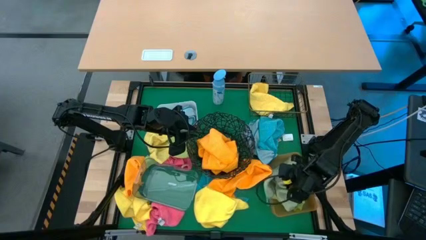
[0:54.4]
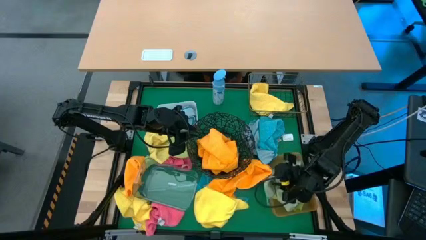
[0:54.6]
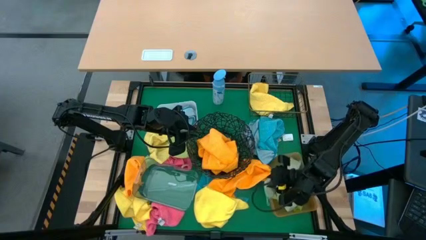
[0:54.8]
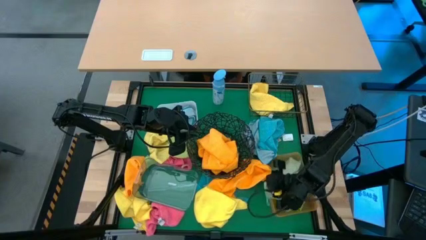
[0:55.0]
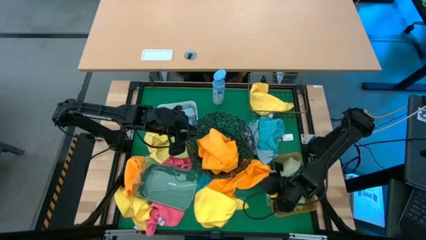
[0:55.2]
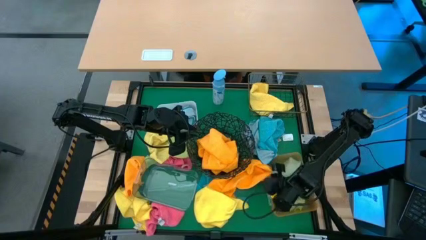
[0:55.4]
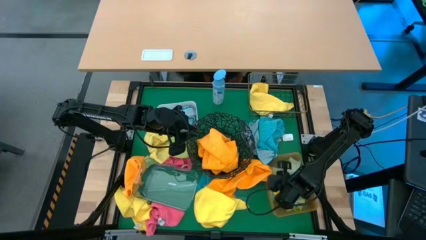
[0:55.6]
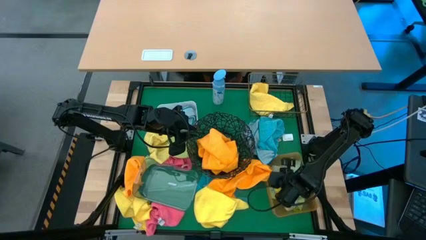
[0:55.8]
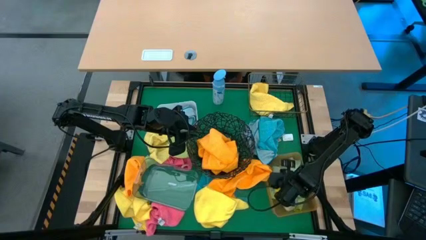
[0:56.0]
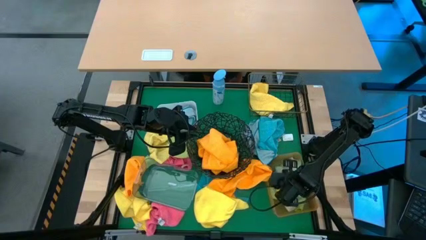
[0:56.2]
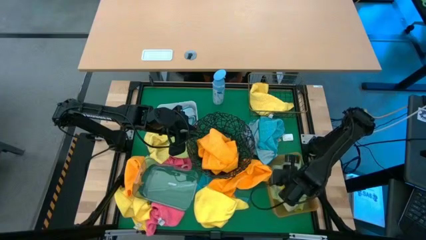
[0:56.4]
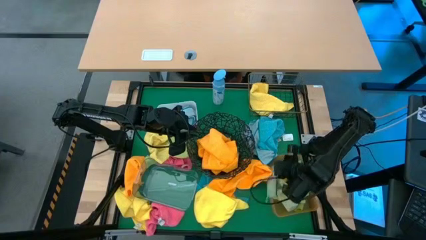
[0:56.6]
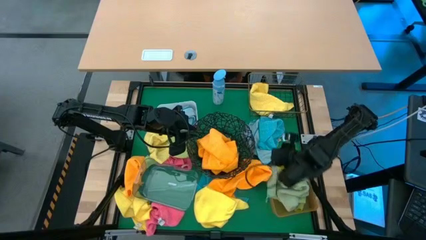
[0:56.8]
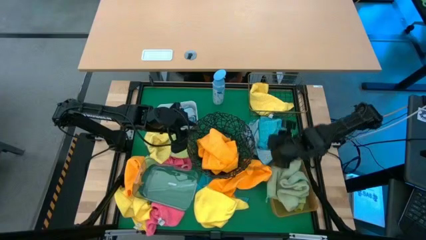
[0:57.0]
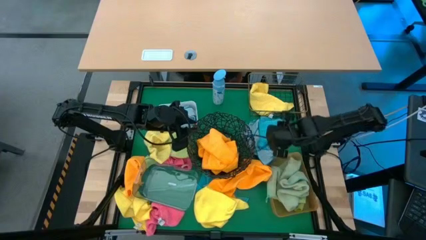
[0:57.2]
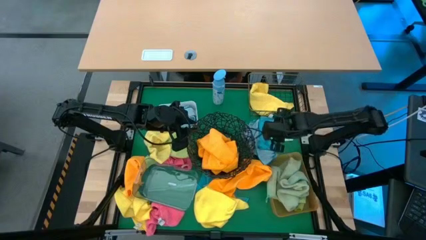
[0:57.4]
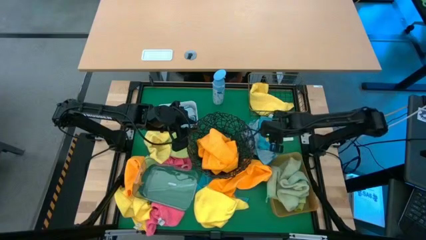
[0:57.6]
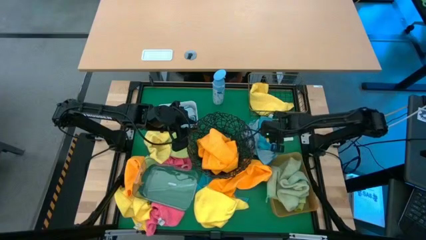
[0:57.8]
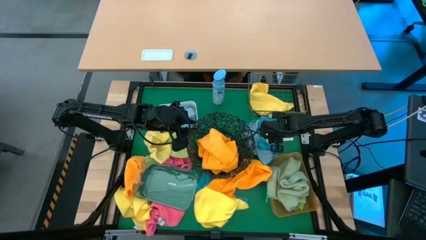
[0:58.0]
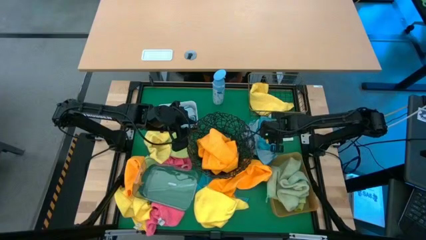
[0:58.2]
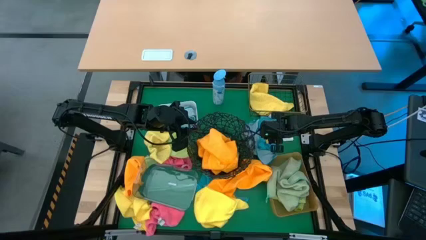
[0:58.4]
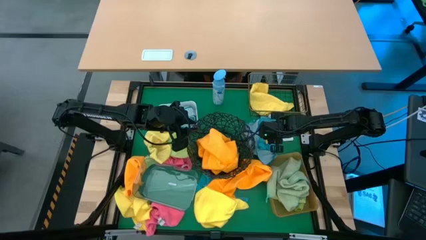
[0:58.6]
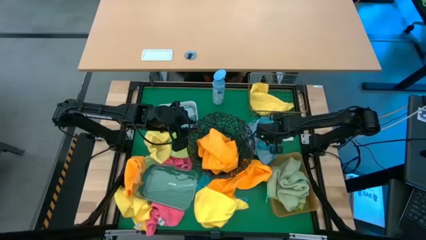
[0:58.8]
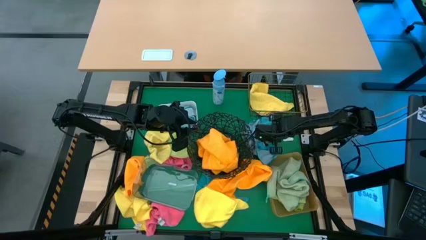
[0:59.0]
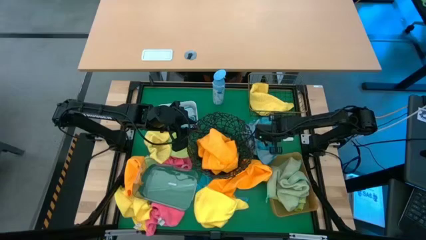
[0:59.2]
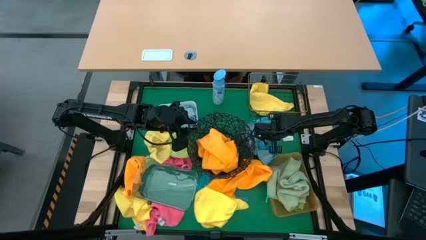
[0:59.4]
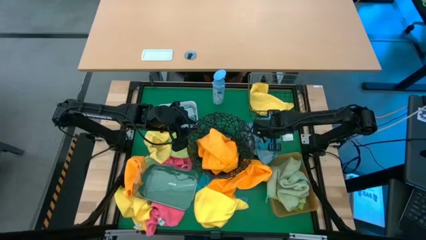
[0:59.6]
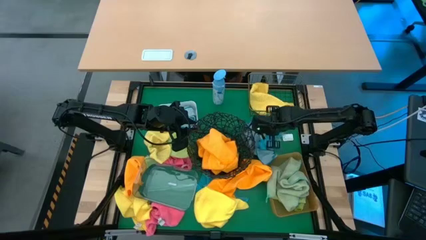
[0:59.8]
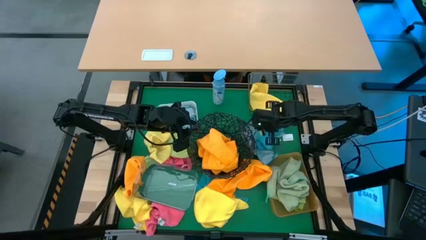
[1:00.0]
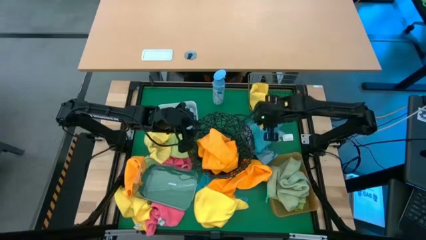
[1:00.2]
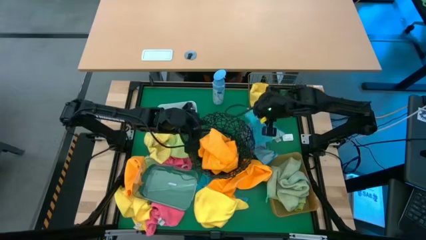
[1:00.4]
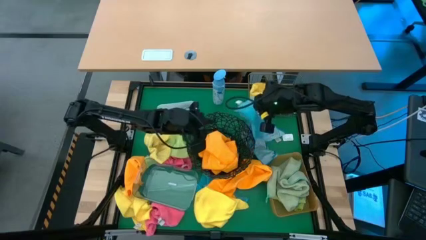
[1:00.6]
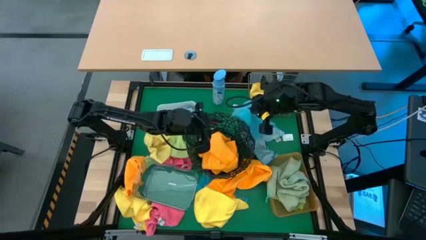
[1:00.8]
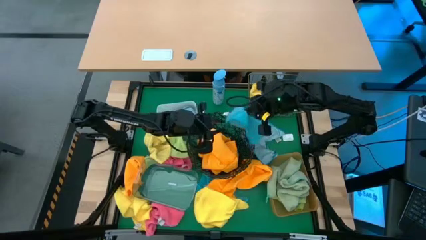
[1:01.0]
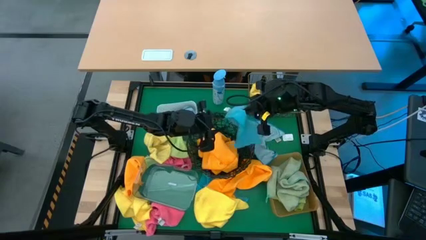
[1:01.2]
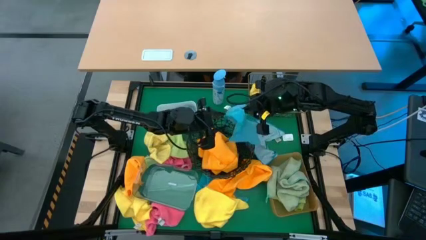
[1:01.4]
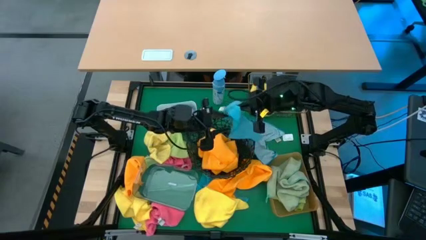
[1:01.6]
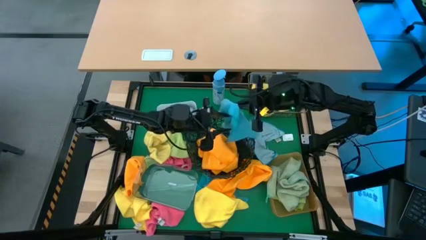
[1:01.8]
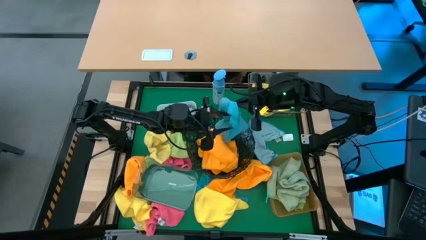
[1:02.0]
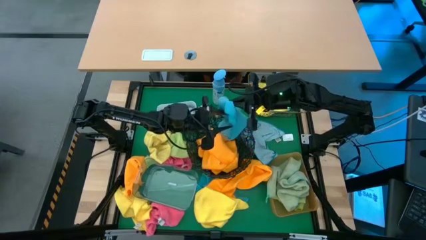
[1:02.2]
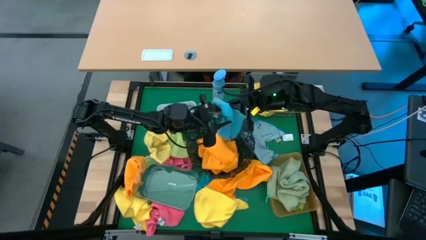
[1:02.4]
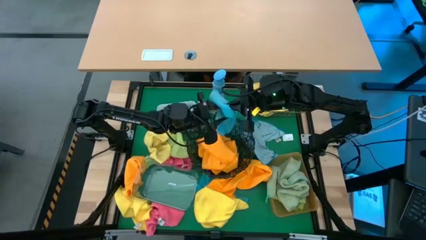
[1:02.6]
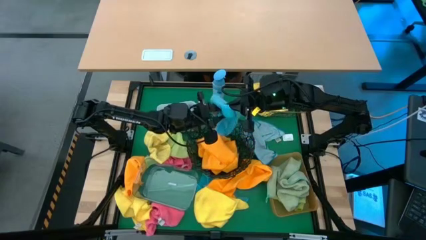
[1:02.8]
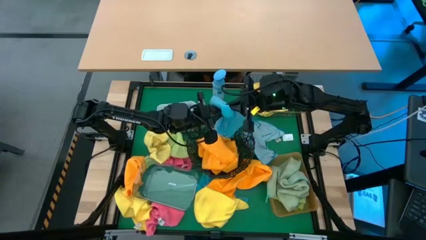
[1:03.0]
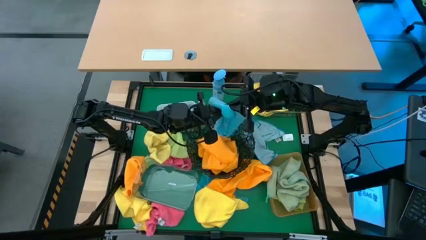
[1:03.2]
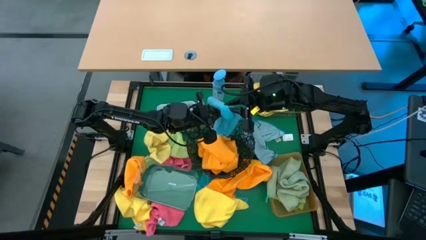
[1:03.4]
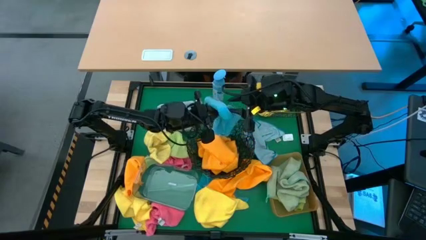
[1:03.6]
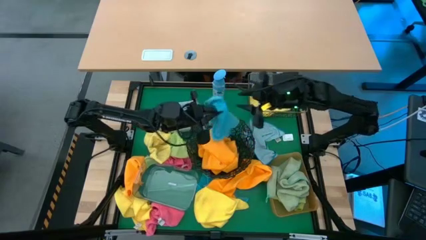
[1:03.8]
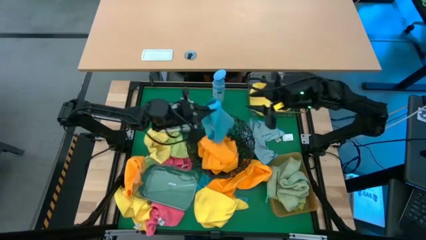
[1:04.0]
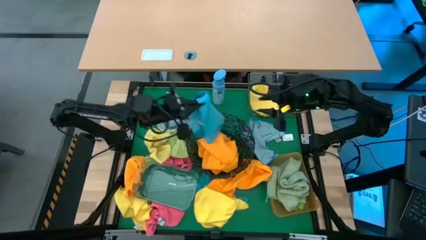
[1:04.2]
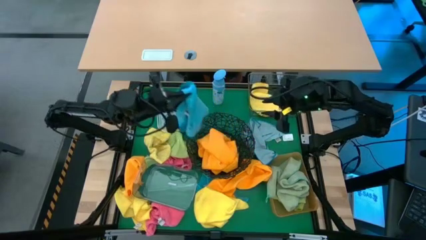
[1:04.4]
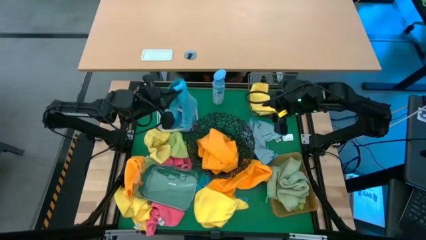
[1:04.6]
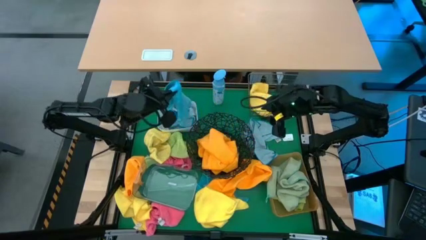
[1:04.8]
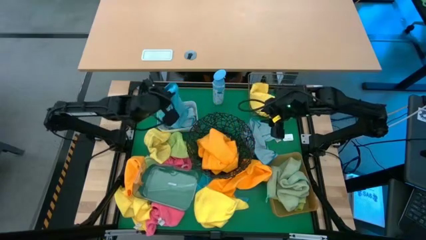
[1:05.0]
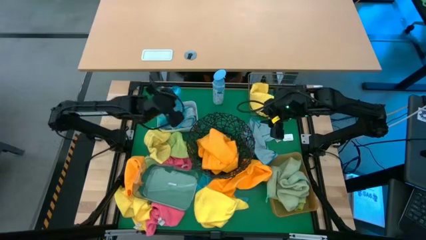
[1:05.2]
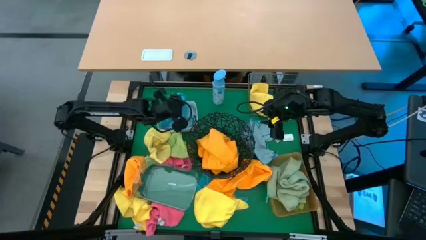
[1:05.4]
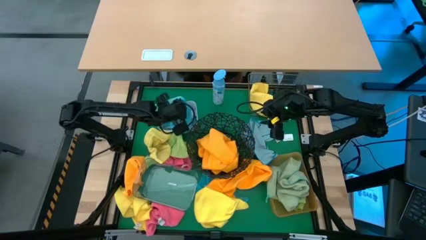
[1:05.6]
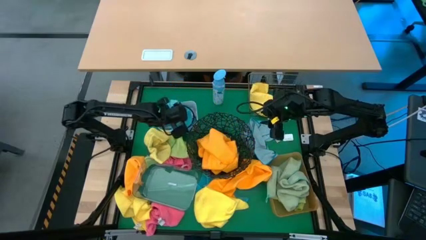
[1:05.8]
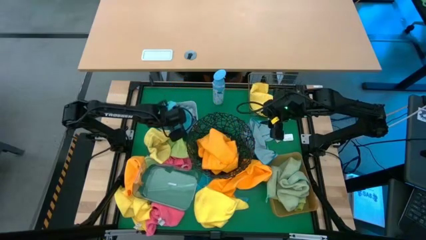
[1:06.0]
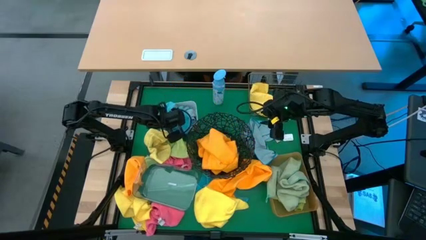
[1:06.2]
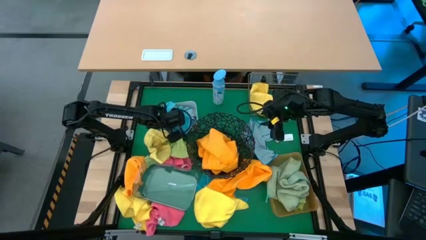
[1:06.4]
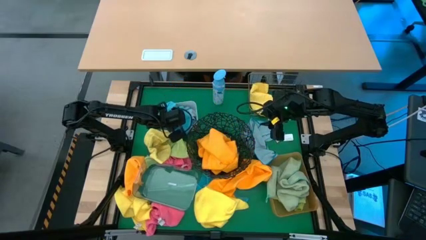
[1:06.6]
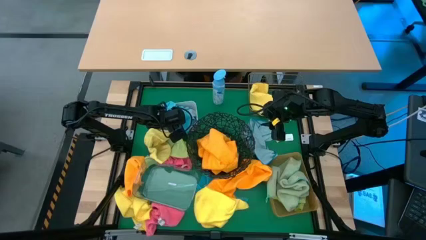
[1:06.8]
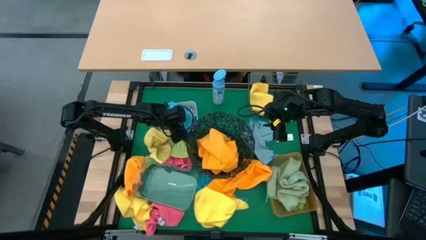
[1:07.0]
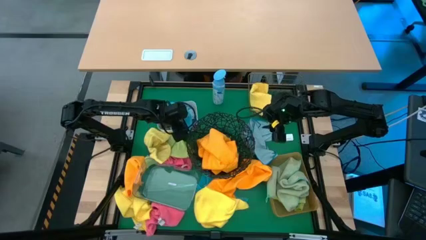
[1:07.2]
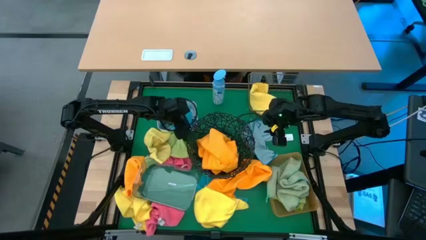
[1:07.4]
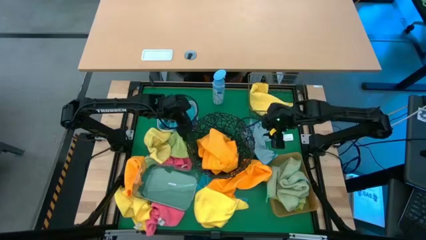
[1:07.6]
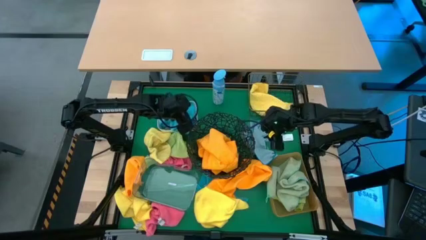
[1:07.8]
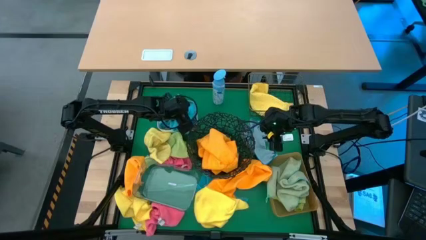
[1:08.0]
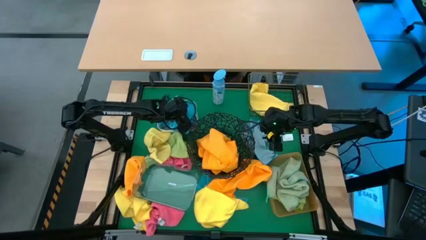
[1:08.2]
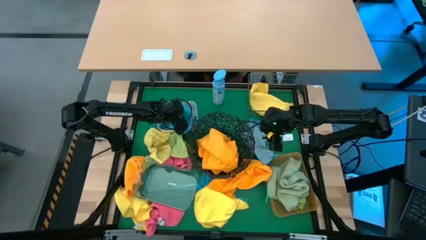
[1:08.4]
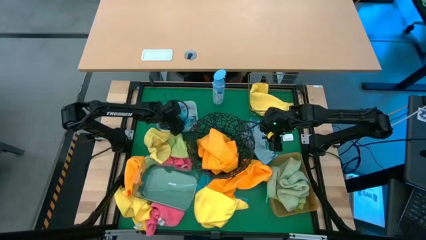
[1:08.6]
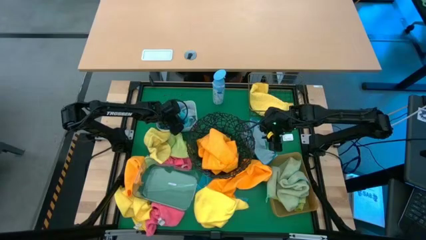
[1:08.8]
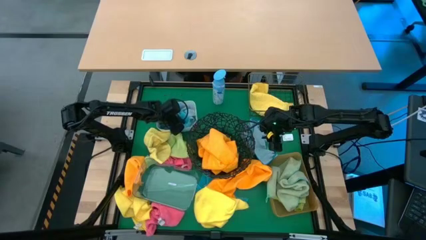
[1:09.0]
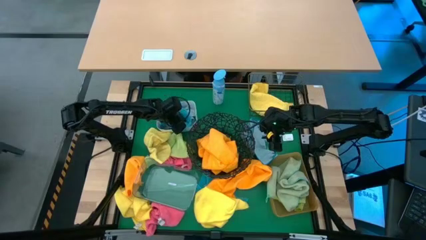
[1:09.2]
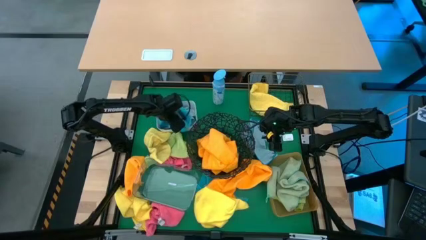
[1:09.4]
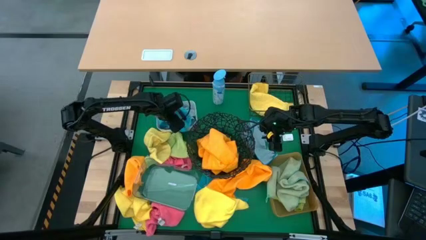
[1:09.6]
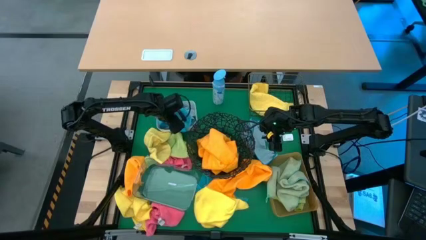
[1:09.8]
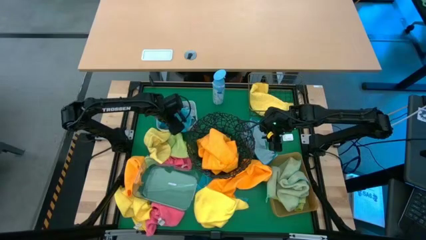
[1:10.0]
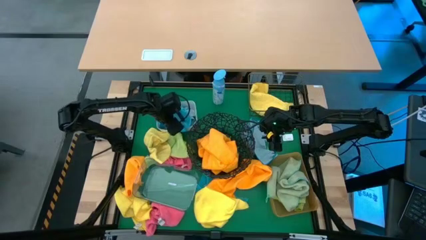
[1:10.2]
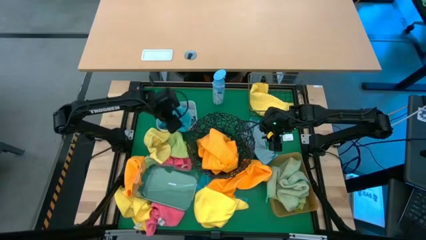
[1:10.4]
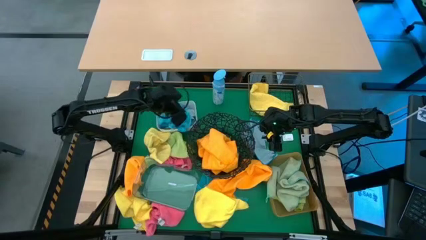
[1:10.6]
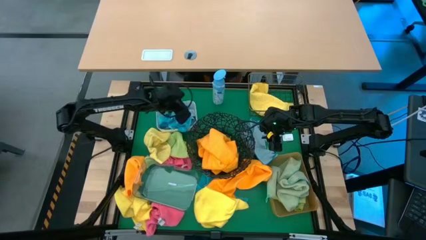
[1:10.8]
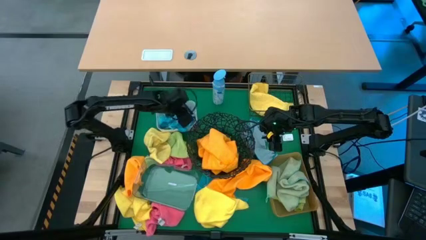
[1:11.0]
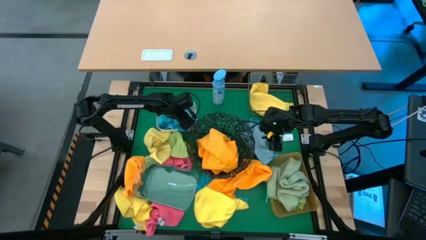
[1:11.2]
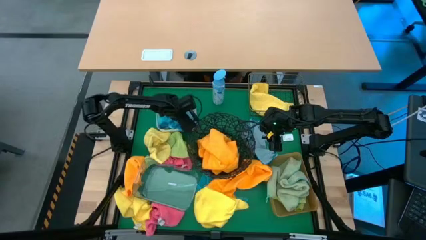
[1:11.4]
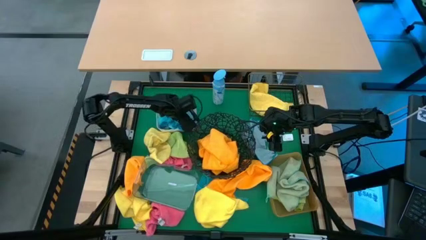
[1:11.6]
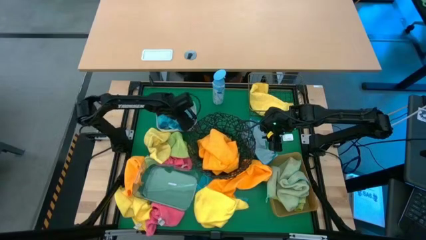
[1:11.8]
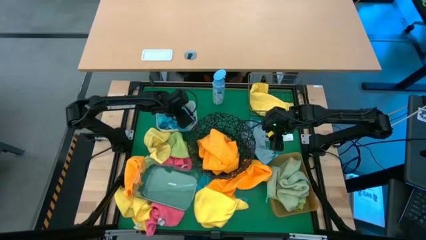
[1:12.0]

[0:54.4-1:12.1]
Task: Sort microfiber towel by color & place in baskets
Put the blue microfiber towel into the white bin
